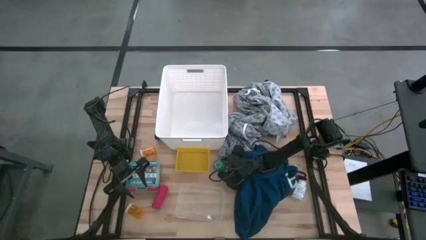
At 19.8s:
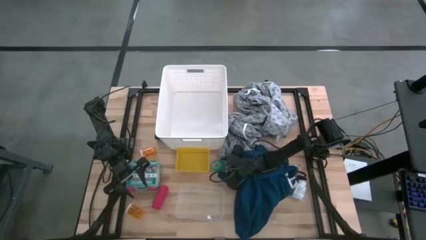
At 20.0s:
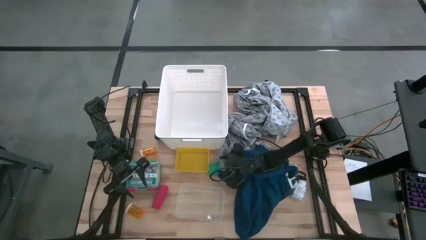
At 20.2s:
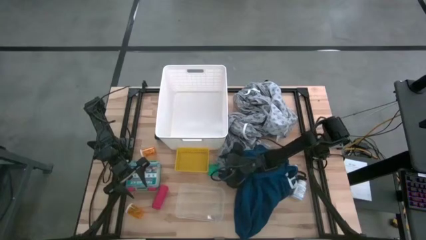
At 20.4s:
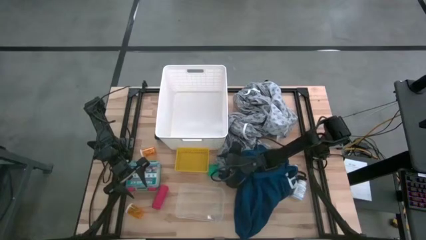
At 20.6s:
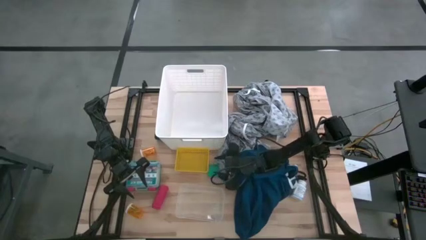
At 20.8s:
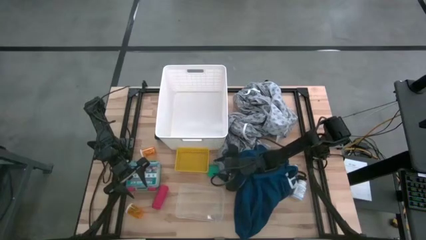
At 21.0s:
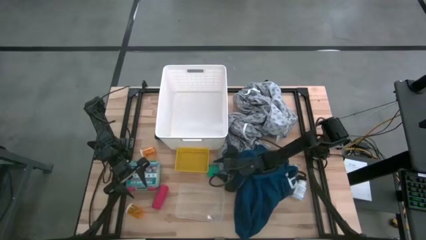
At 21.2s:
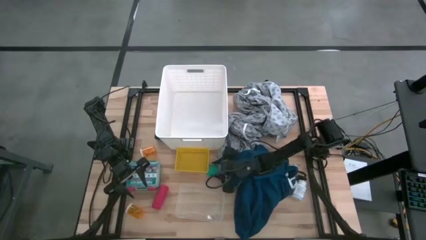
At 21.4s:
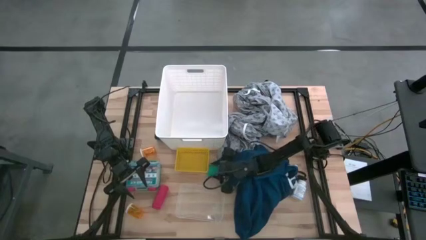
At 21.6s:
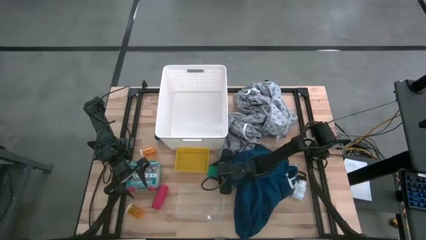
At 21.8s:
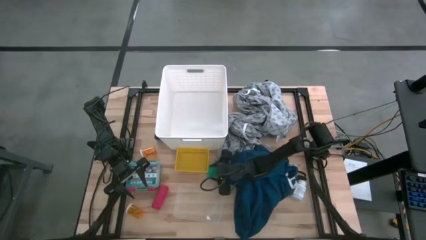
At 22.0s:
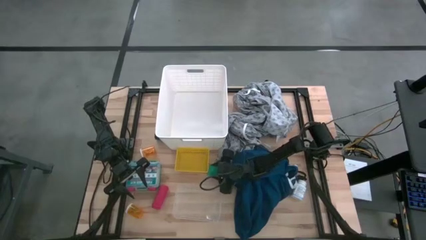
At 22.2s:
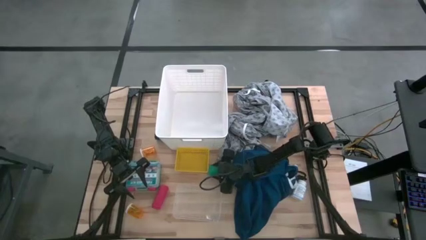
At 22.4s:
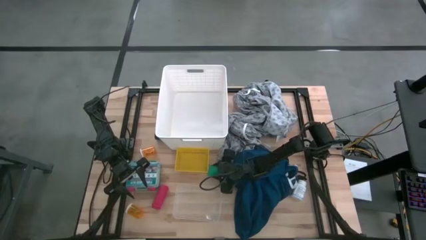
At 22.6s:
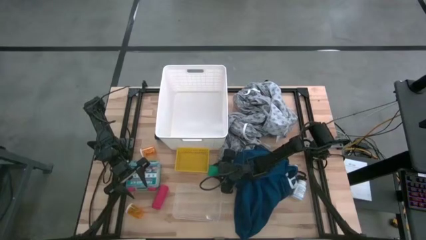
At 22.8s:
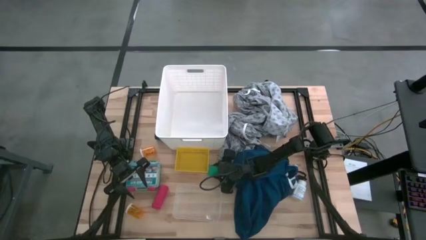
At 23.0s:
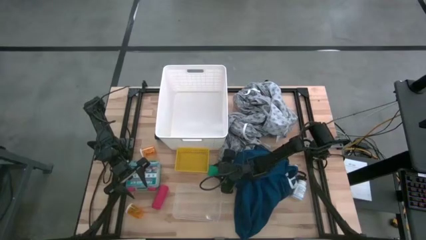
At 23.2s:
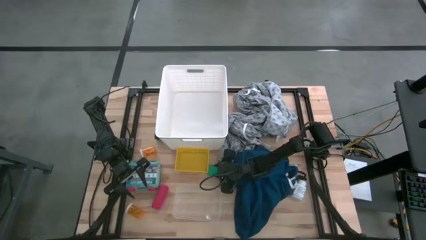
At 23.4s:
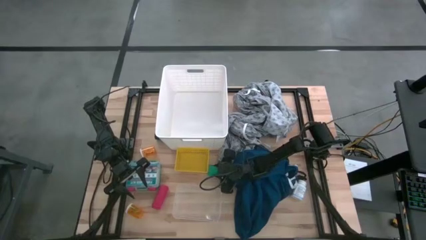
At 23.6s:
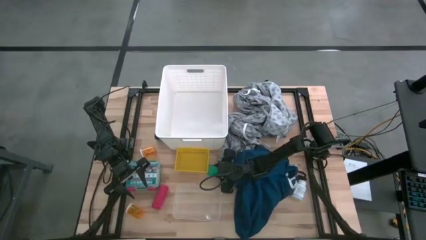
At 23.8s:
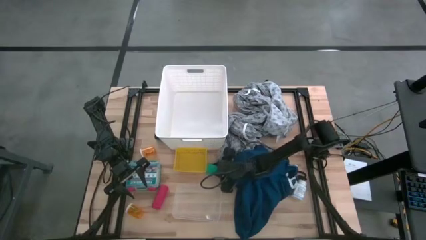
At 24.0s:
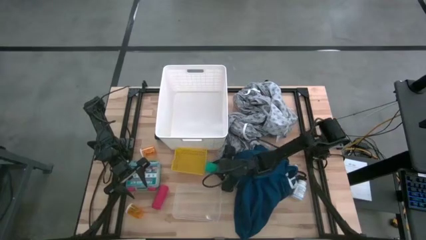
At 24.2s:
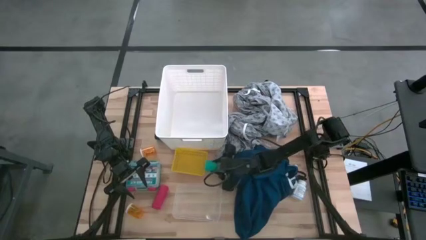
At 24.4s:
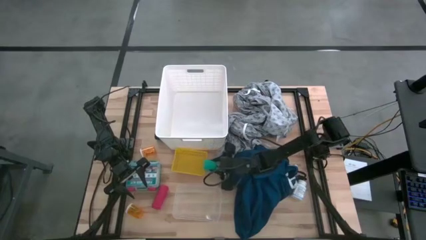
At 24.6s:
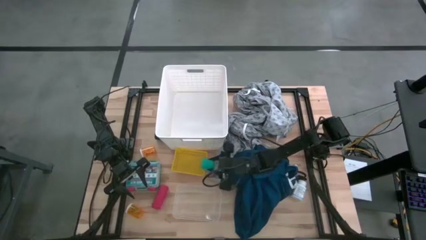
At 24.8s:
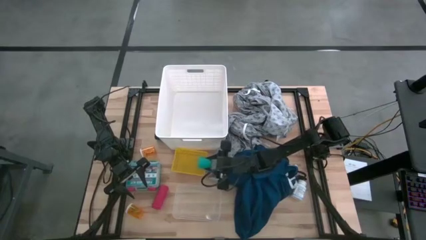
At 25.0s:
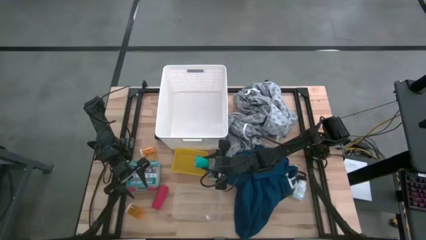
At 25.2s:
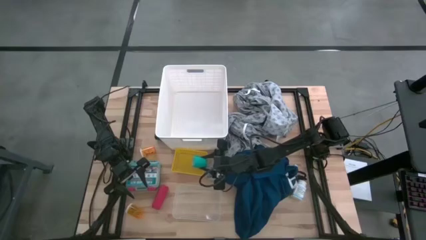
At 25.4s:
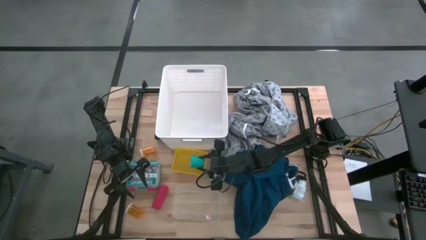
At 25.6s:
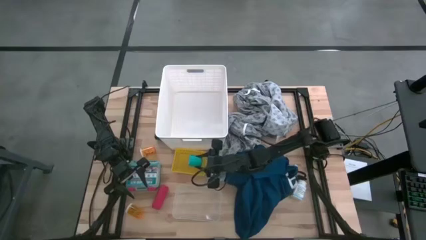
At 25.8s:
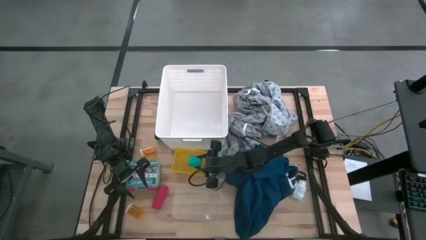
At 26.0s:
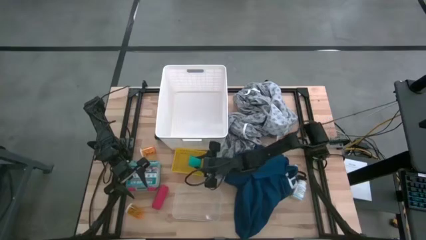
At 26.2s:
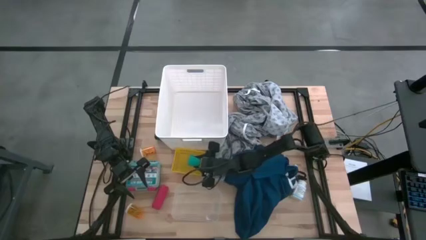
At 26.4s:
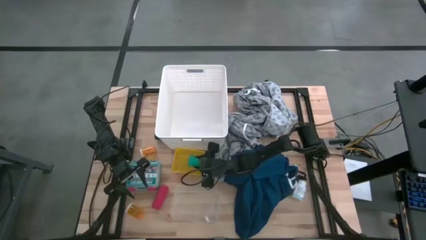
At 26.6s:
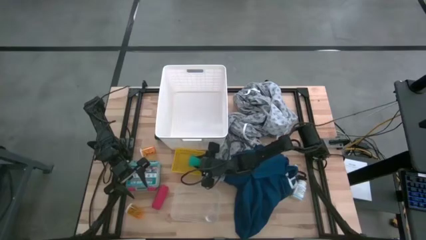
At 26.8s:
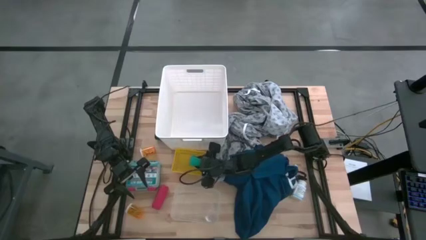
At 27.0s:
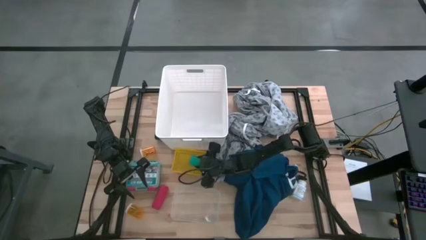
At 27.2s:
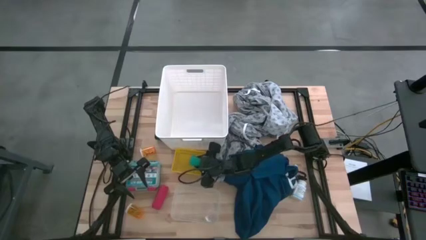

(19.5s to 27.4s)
Task: Pick & Place Medicine items
Put the blue bandage into the yellow bin

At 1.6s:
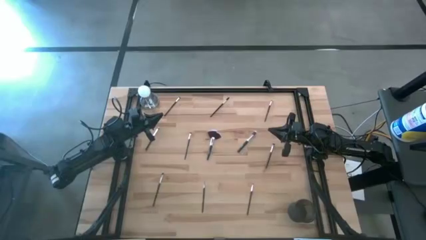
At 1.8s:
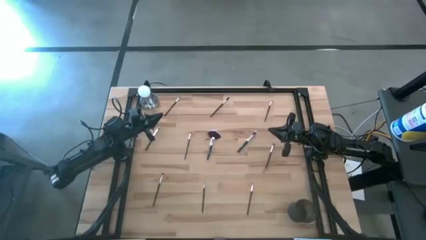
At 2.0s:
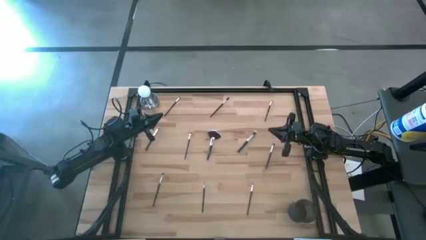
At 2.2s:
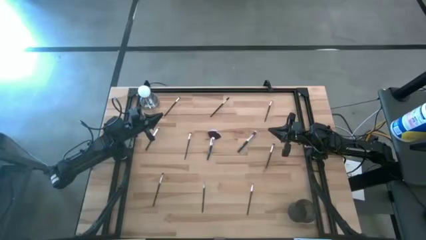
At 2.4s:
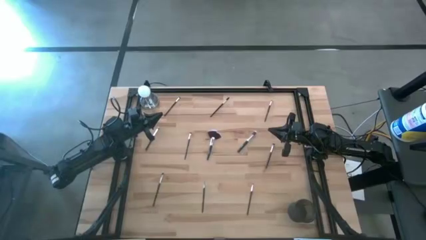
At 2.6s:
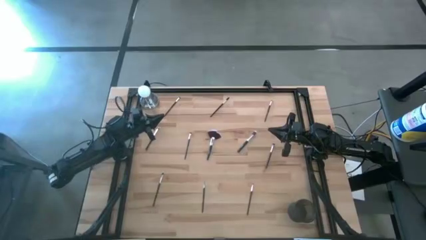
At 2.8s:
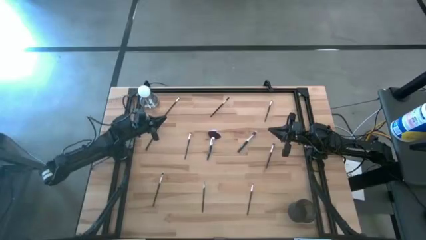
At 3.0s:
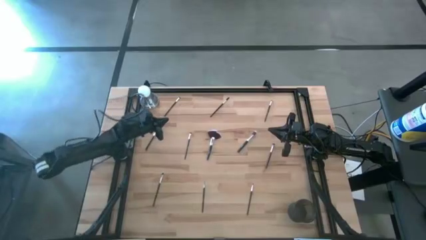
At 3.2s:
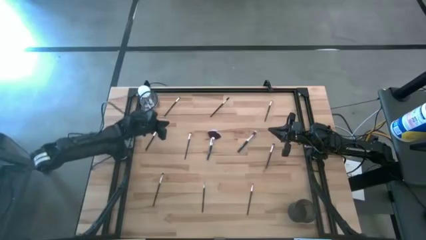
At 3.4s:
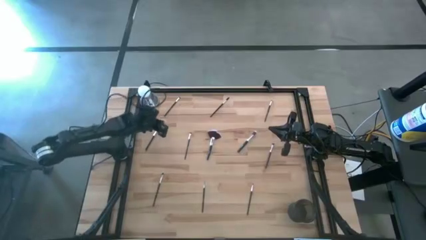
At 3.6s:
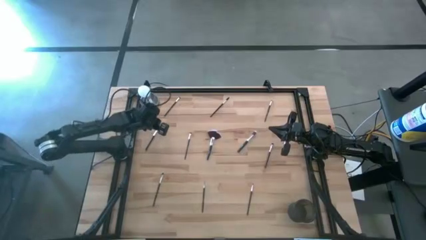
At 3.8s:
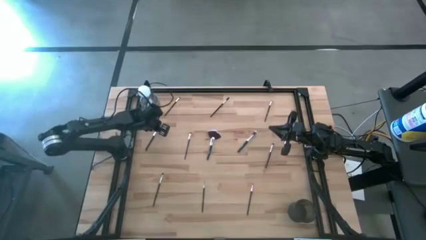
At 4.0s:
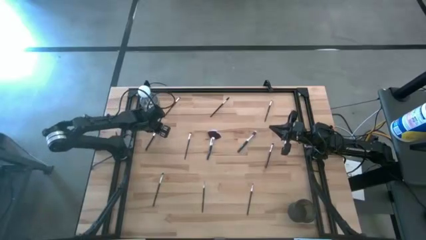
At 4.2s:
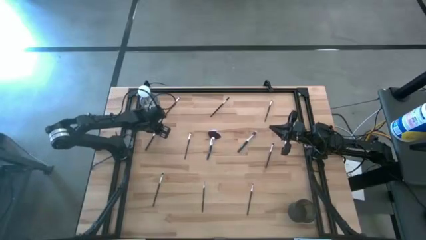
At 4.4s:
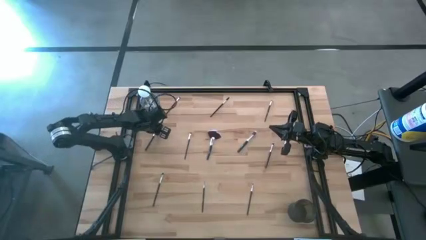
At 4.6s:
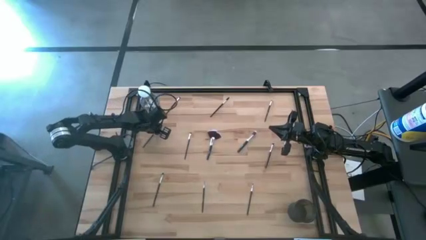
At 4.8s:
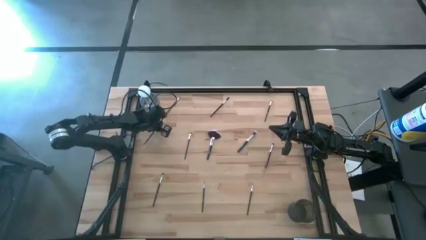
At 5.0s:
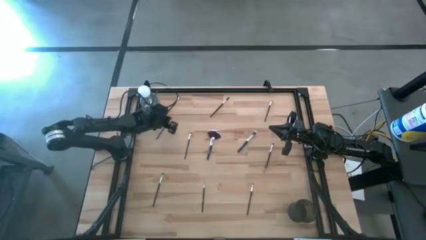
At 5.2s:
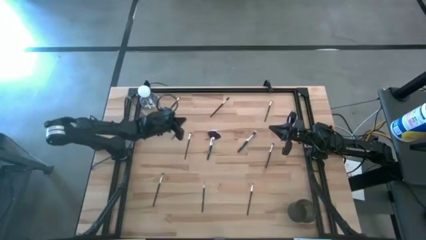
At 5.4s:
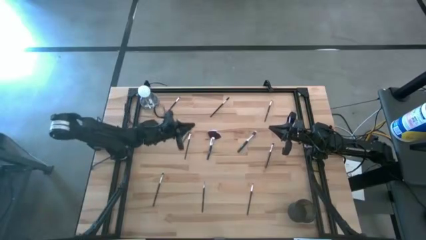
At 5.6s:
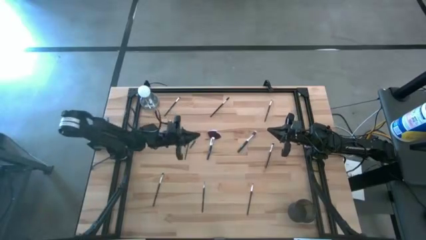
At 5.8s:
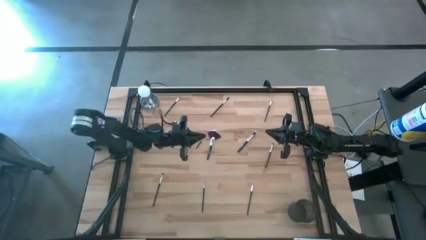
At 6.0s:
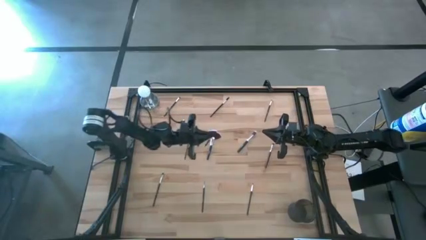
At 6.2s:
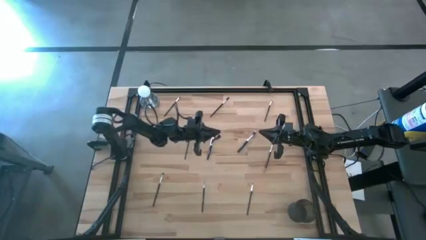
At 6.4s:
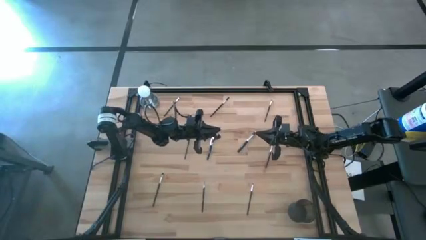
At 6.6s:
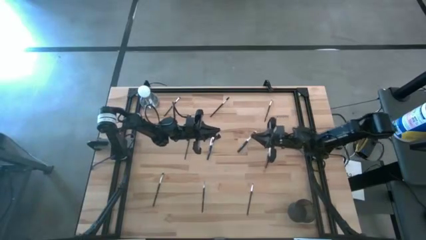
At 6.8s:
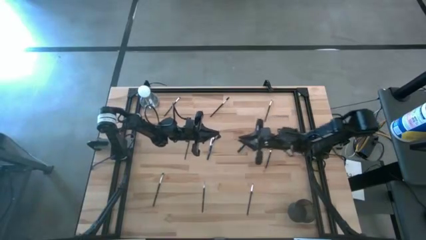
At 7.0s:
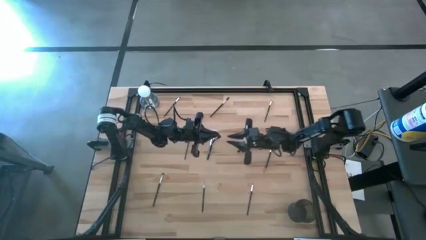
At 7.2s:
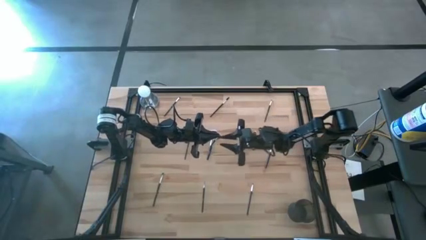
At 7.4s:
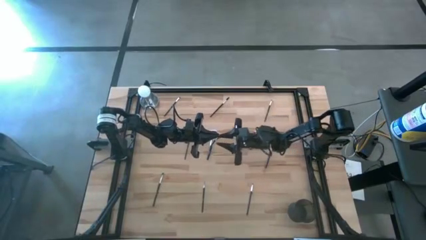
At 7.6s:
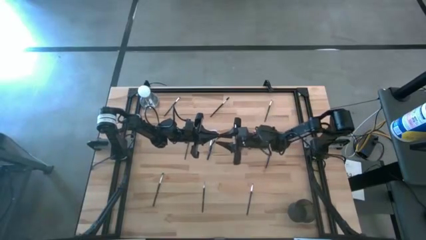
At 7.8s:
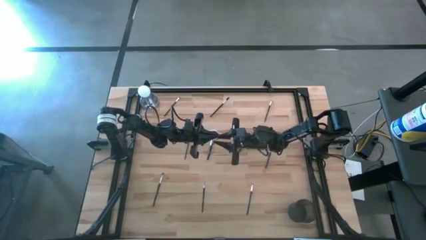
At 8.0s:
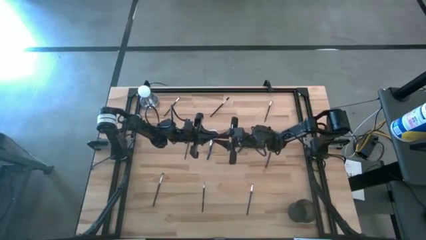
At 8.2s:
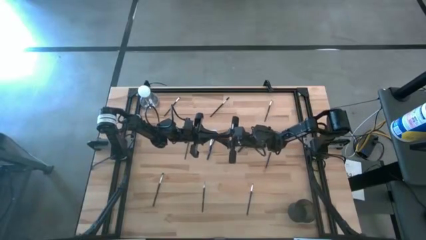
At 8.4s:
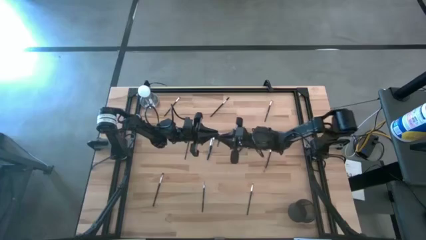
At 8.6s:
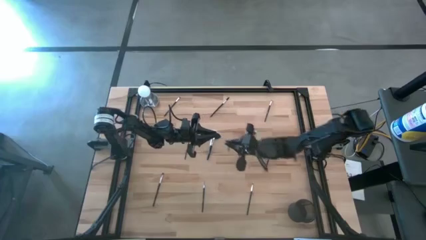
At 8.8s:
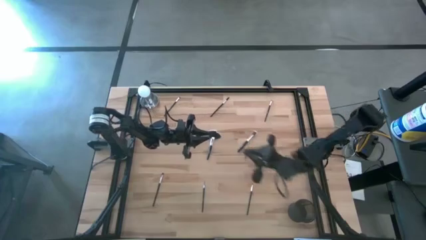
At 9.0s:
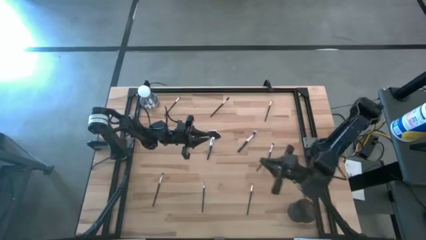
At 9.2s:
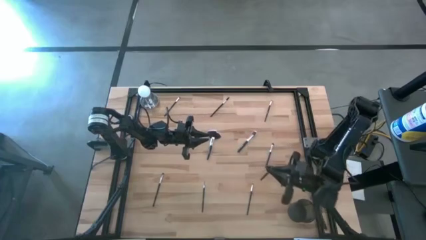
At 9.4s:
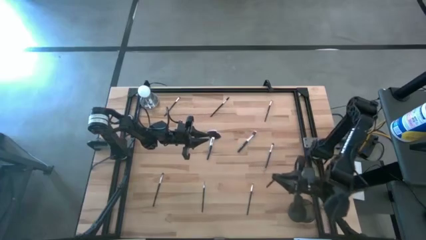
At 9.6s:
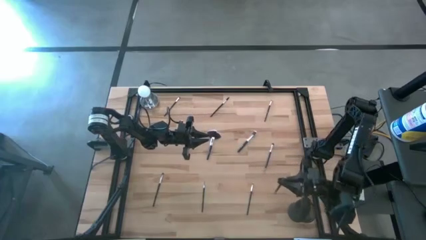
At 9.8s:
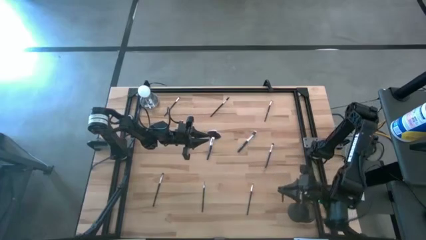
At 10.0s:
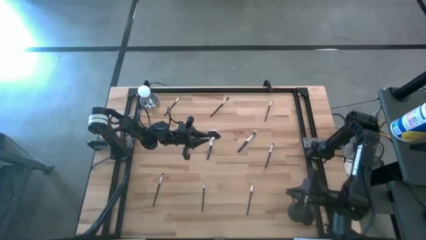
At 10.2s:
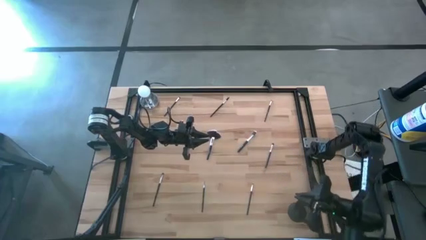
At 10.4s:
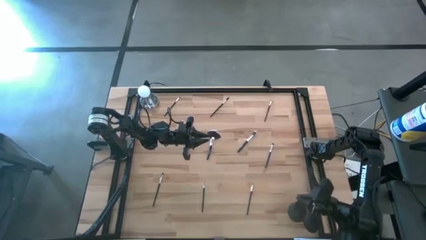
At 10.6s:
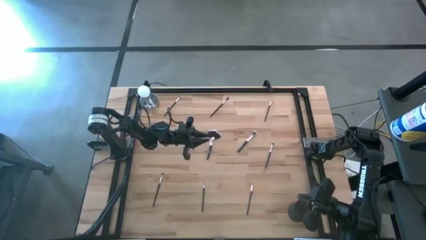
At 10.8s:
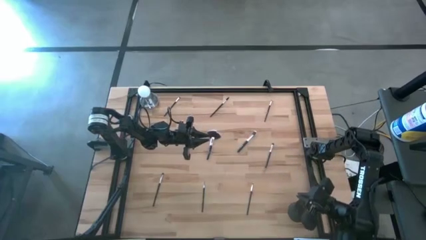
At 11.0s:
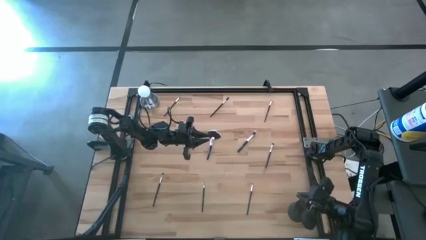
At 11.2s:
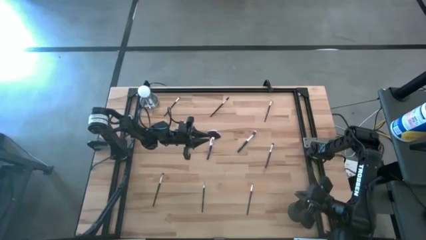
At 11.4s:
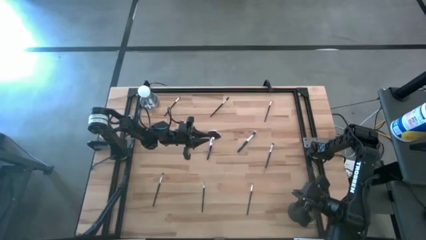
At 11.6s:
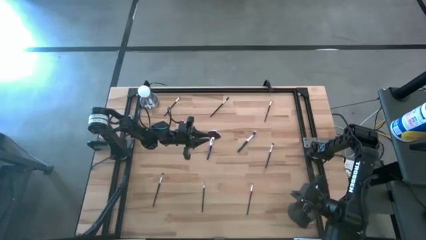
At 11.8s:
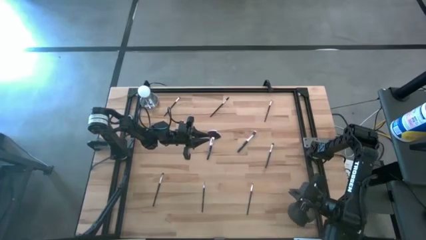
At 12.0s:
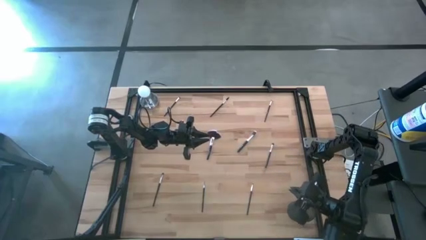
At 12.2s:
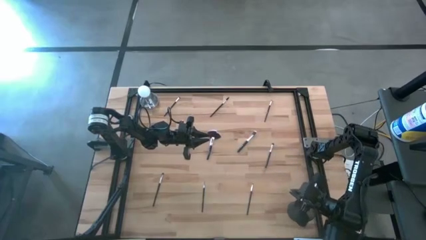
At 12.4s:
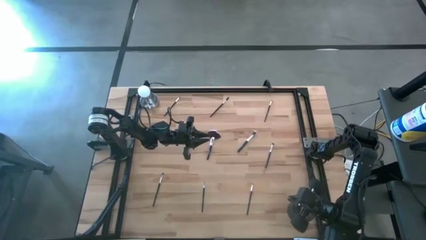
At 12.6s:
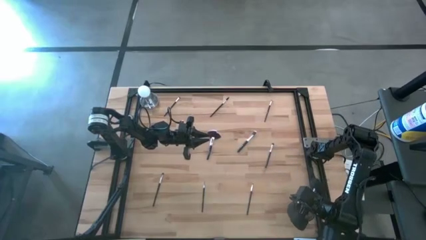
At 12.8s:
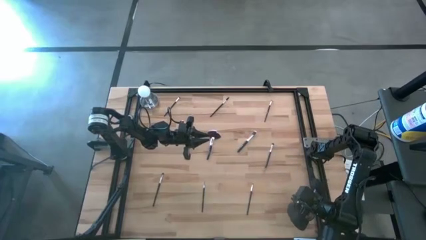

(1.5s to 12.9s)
Task: Pick & Place Makeup Brushes
Put the black eyeshadow brush into the makeup holder
